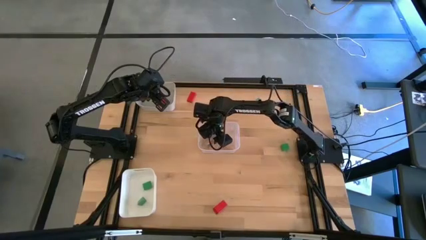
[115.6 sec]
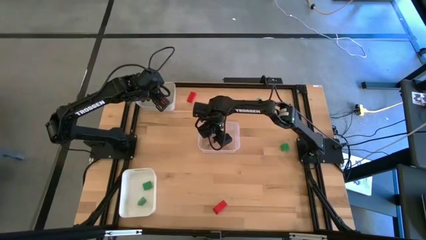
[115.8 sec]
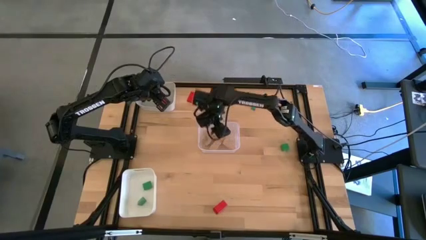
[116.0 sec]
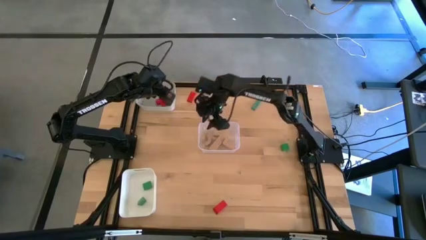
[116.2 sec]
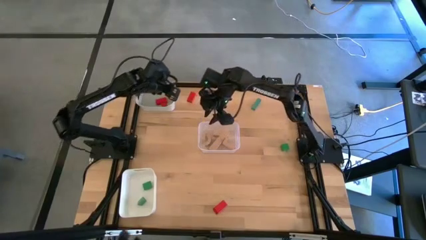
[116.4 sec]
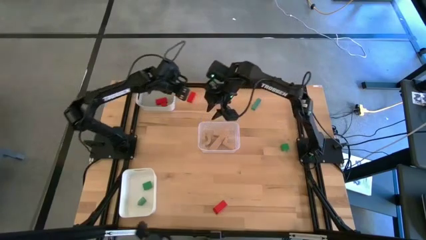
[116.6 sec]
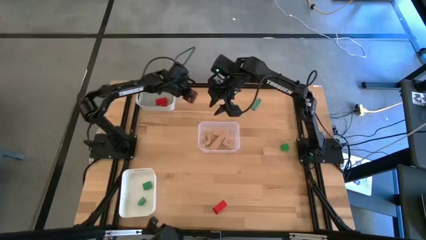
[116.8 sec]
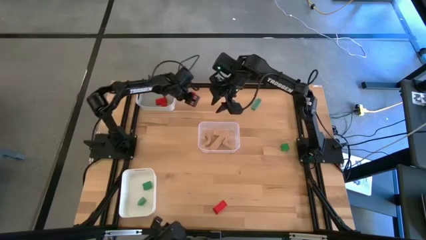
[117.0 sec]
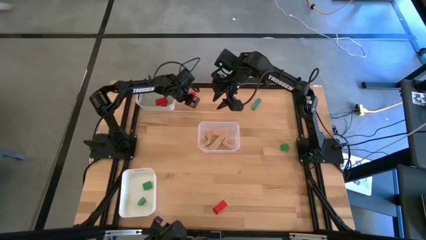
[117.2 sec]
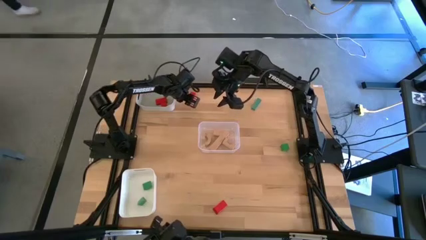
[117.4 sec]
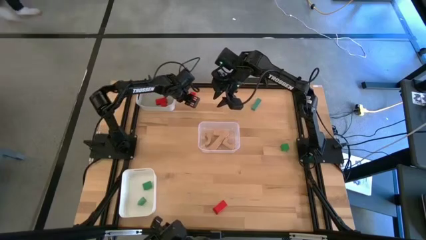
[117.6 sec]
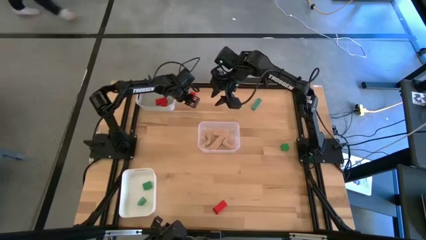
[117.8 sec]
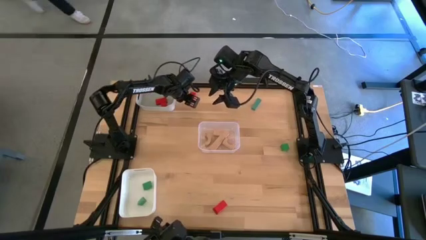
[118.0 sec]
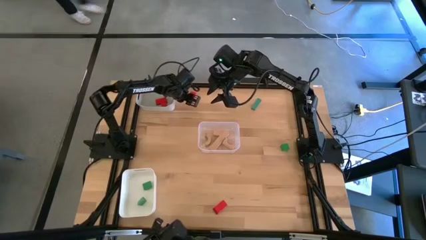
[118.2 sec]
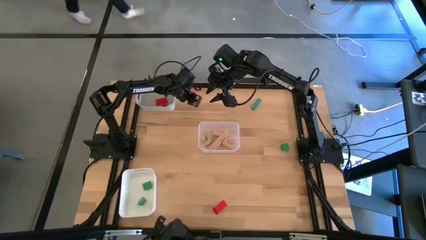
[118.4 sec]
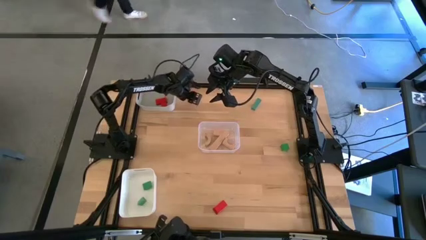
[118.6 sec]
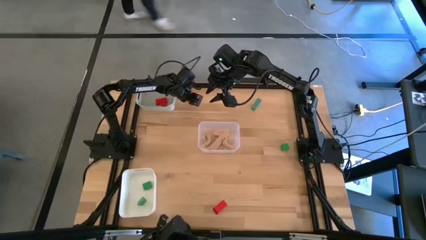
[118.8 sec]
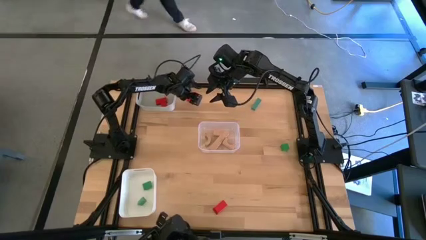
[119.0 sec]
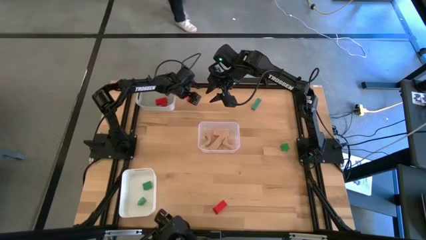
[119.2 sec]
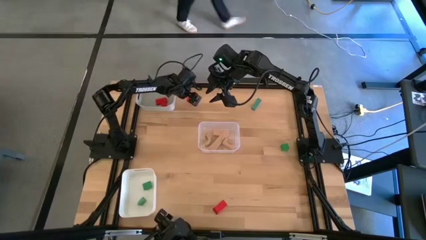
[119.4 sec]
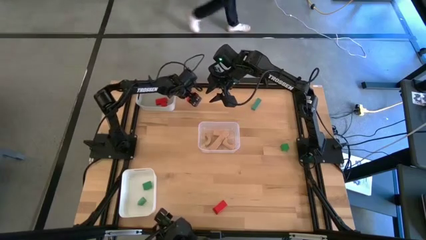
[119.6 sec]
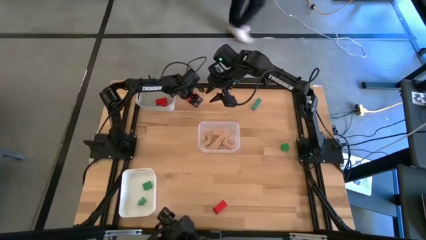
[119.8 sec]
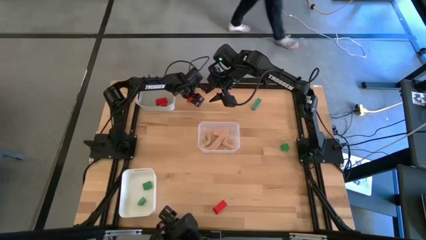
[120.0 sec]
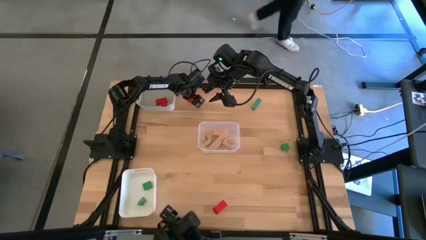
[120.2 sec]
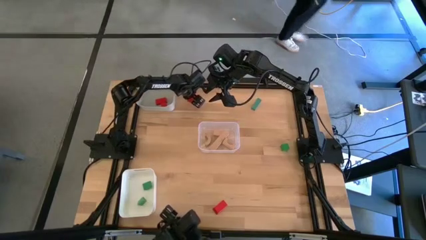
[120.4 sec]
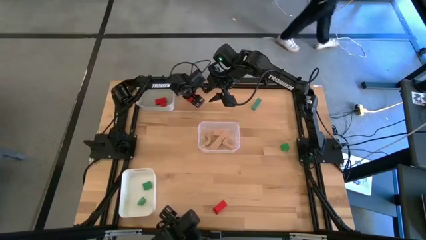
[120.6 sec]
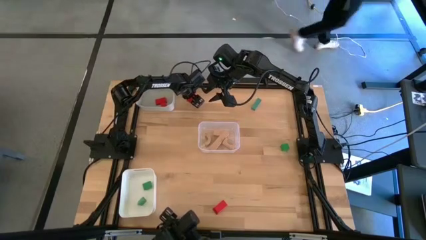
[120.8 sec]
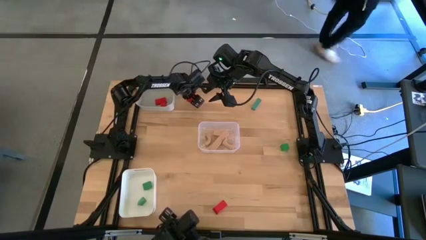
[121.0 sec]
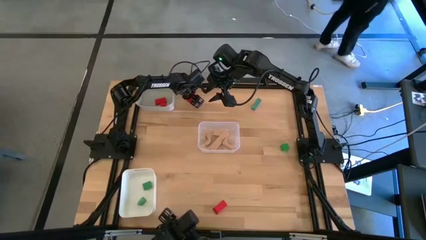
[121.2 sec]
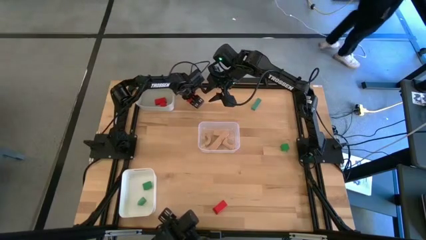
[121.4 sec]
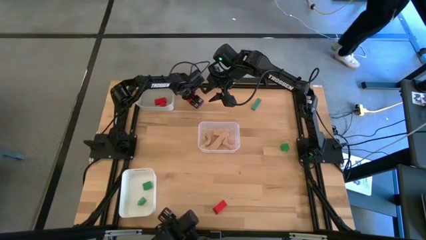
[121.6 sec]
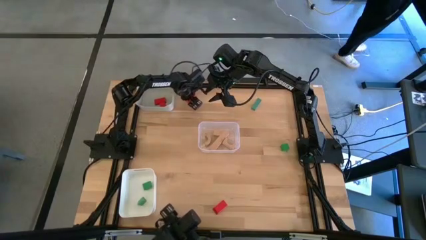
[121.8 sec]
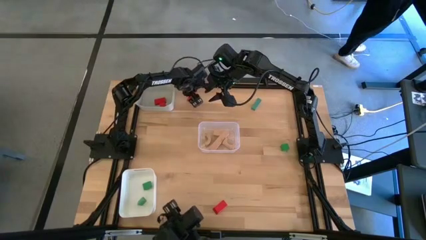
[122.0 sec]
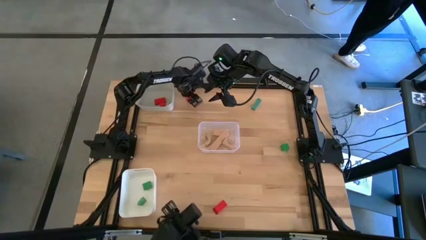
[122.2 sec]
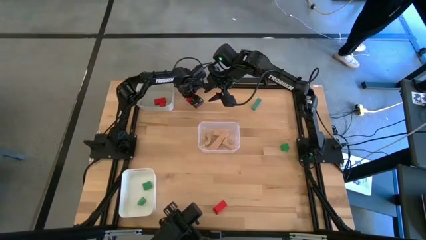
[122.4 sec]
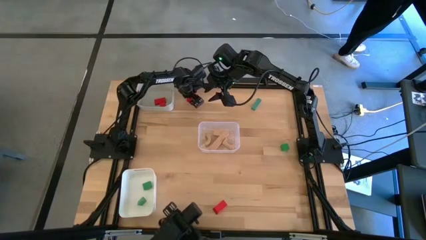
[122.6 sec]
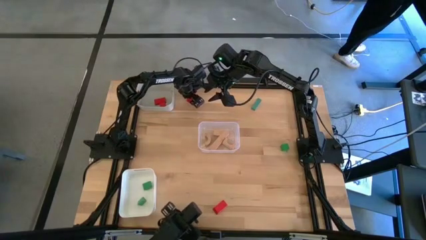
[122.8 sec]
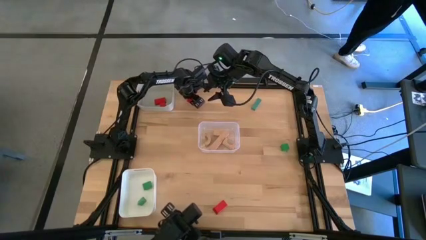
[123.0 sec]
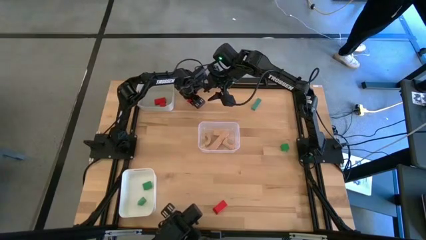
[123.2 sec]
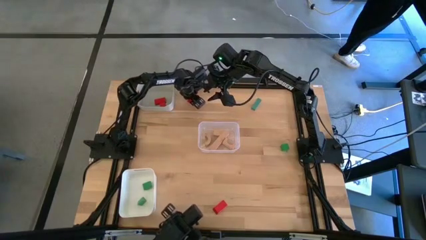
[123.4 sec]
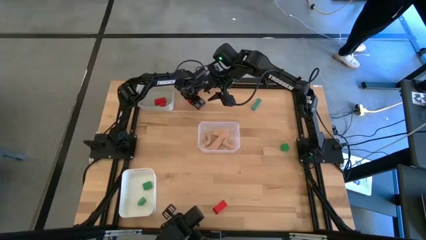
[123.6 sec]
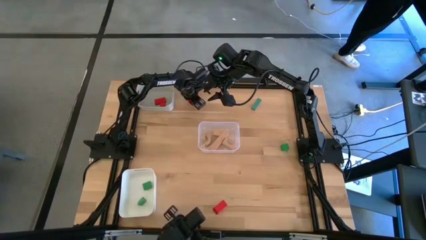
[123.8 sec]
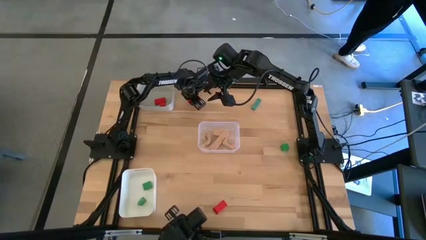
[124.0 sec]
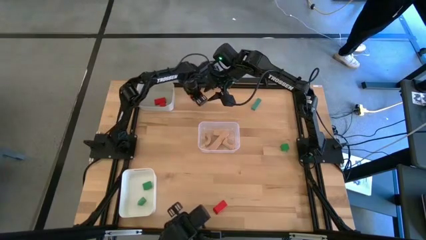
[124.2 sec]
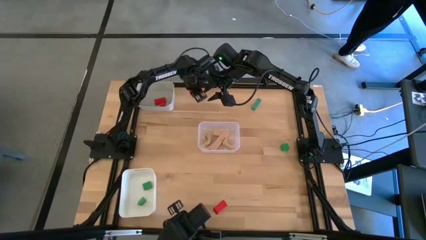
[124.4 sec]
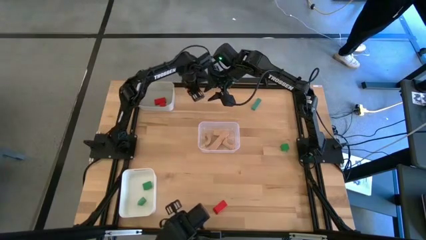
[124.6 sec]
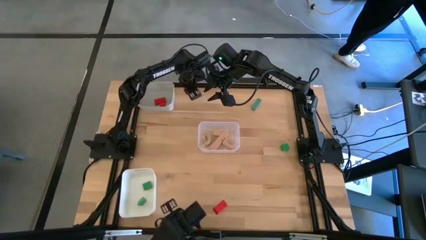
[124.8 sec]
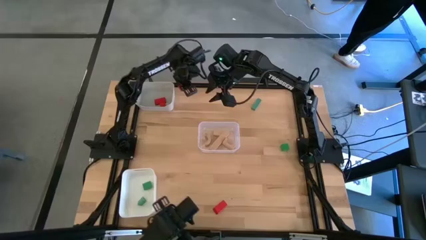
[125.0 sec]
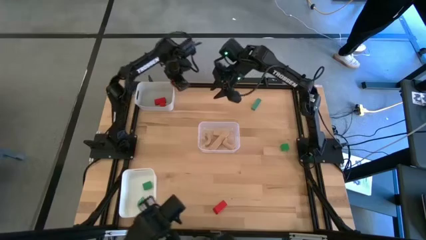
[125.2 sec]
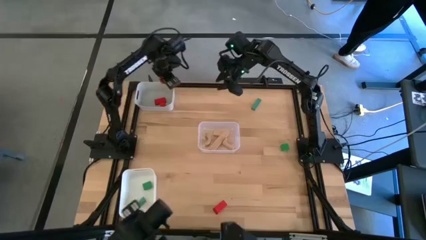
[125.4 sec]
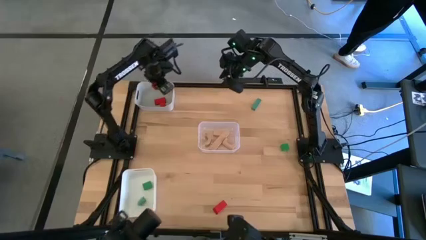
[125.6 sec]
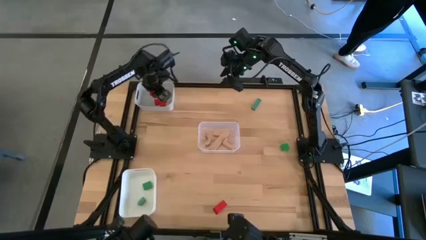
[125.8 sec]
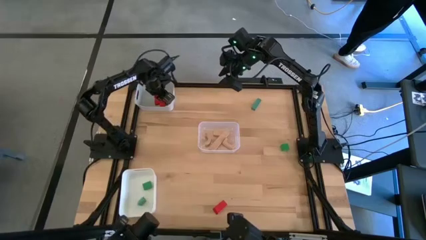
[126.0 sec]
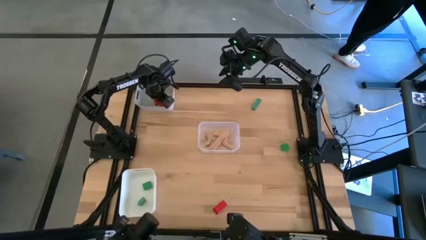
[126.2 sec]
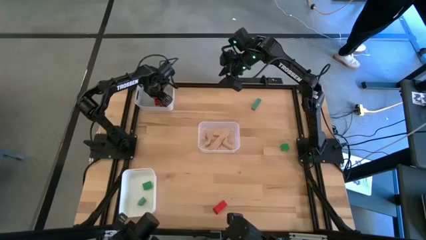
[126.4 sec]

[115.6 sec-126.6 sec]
Task: Sort & place blocks by color
Put the red block into the gray bin

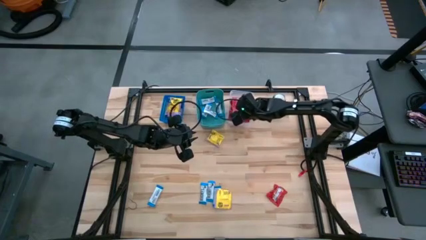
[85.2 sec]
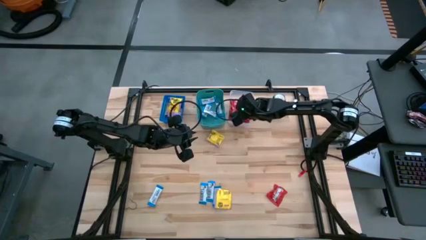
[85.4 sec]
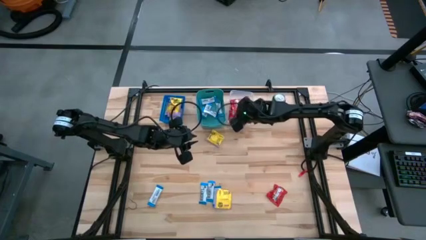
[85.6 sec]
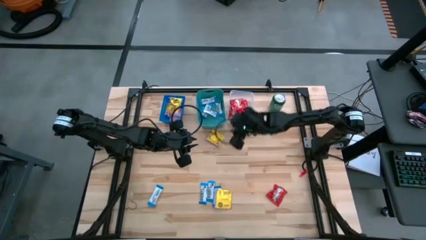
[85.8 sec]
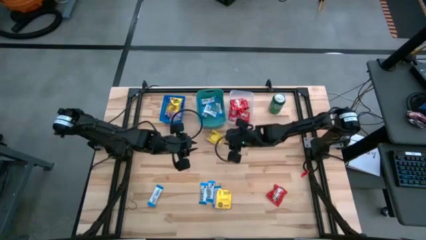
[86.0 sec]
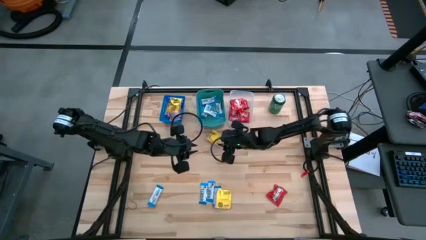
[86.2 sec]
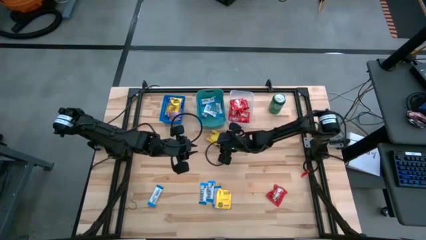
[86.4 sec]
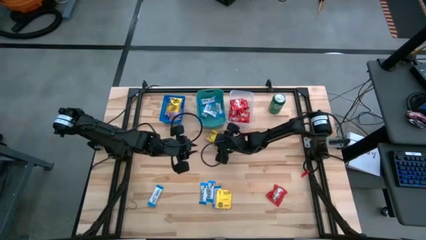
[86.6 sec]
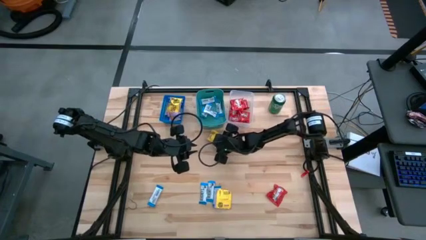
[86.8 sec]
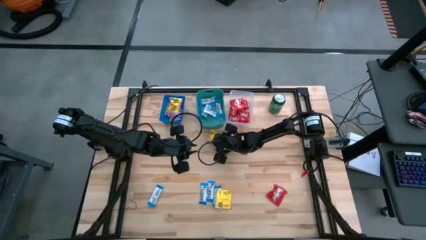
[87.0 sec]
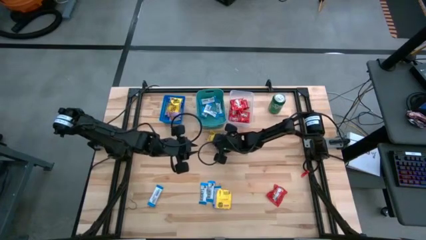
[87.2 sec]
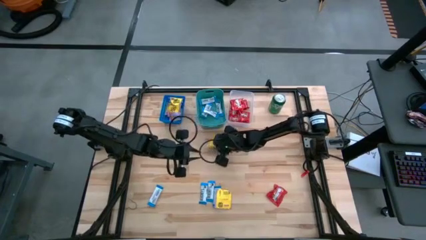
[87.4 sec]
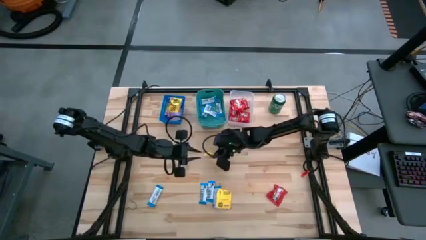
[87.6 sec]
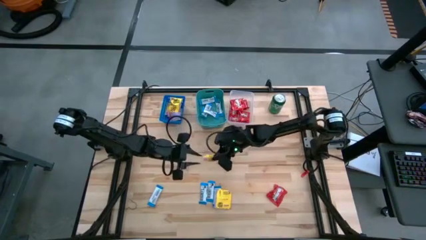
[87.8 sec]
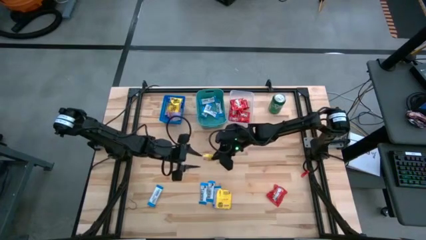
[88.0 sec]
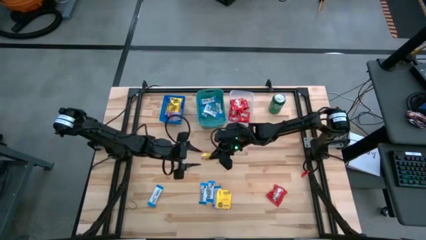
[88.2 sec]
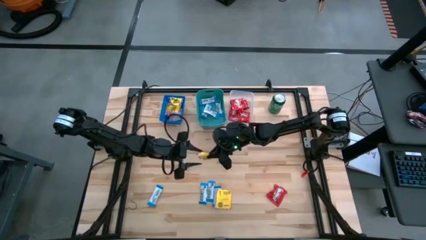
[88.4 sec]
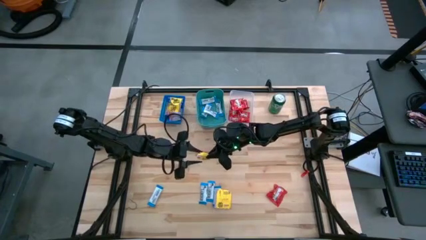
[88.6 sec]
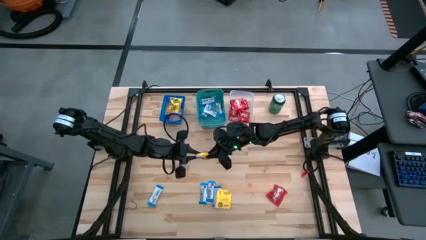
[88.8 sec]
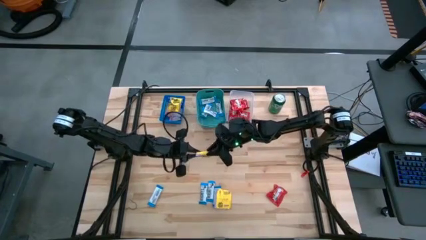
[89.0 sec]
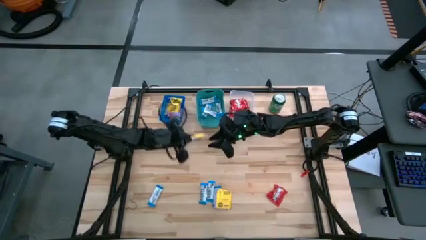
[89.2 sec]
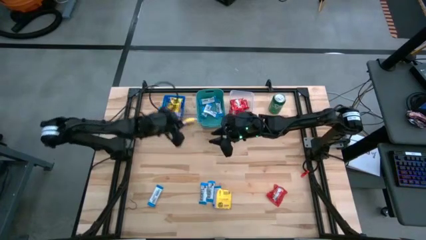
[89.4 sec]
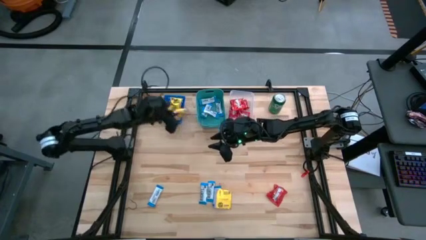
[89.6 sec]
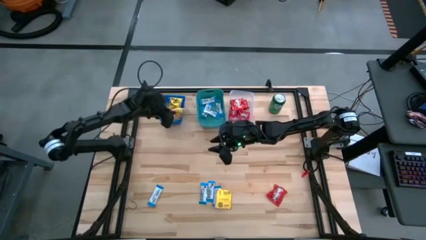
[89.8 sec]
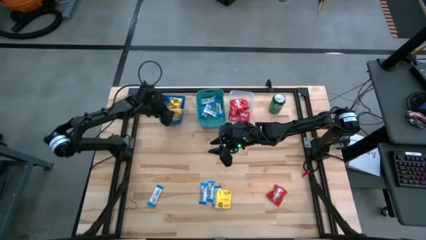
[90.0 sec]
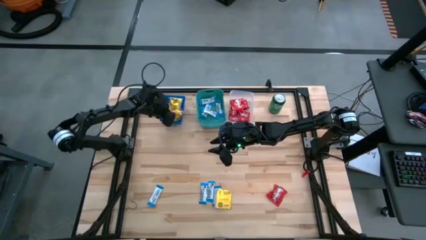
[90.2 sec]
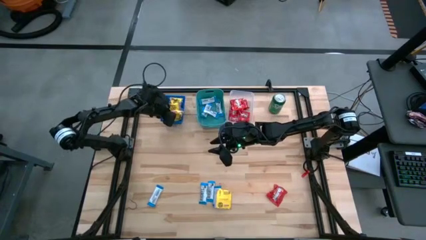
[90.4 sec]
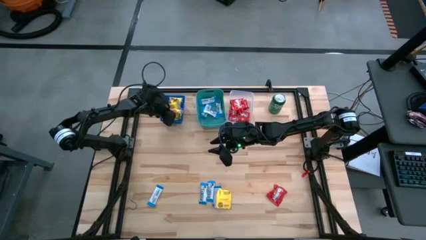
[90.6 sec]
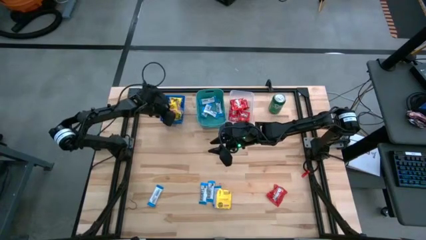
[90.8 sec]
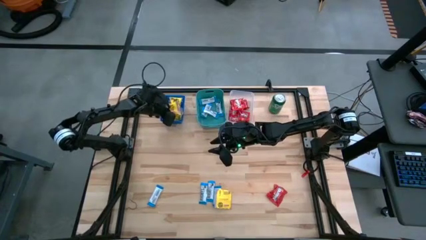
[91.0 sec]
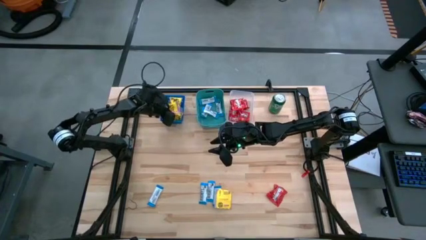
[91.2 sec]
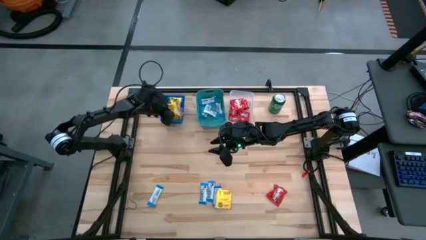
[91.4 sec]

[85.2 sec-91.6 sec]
Task: Sort candy
Put the yellow candy into the blue bin
